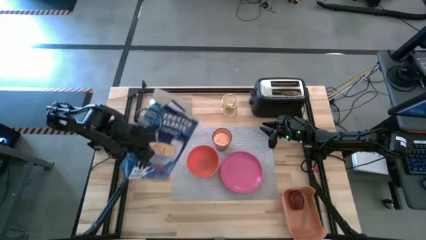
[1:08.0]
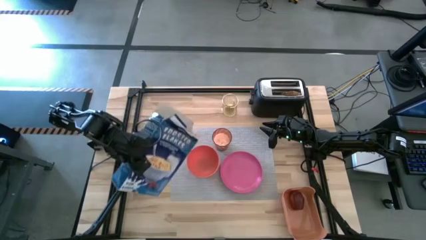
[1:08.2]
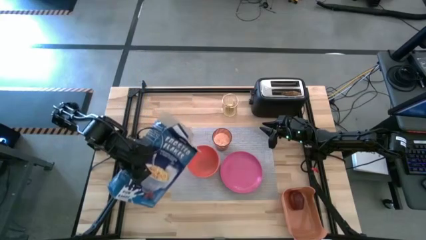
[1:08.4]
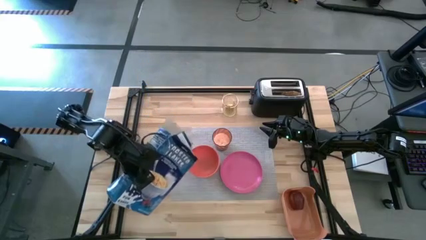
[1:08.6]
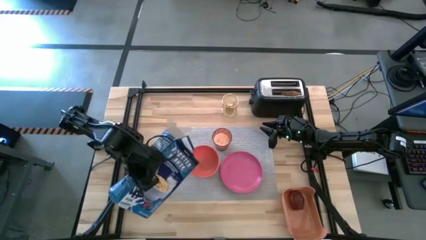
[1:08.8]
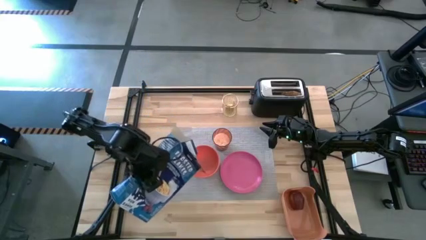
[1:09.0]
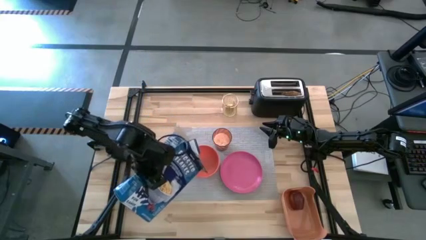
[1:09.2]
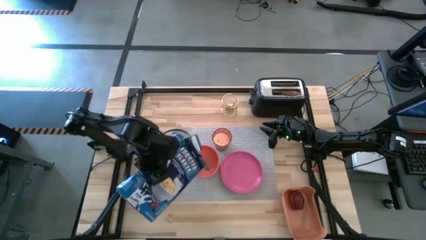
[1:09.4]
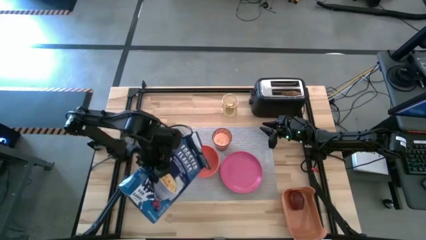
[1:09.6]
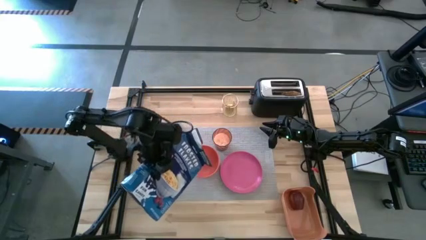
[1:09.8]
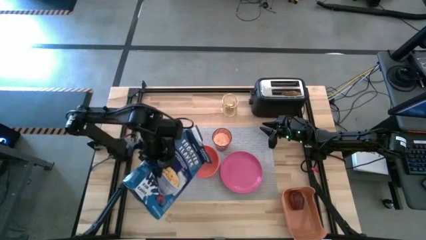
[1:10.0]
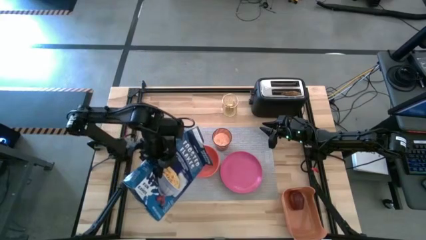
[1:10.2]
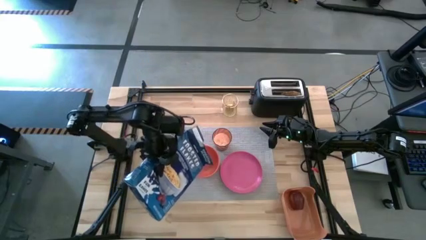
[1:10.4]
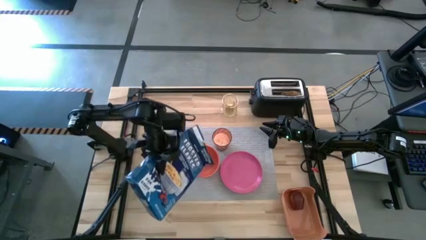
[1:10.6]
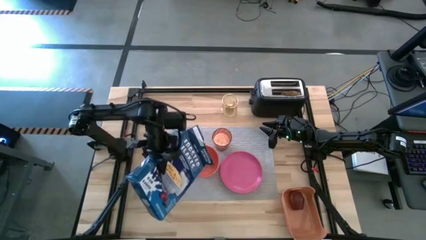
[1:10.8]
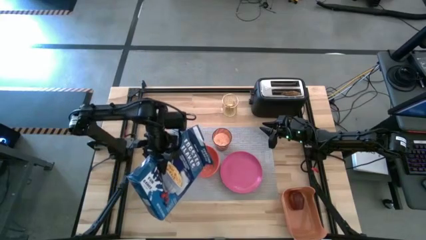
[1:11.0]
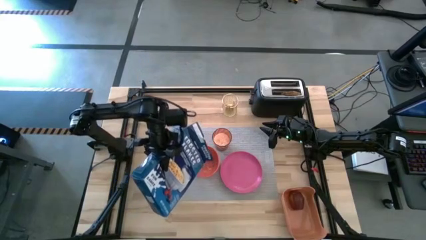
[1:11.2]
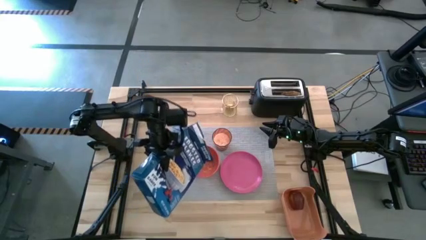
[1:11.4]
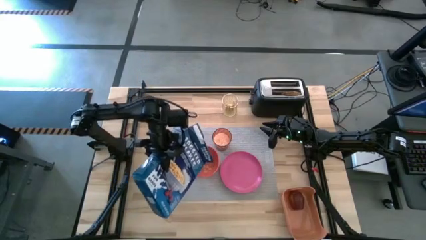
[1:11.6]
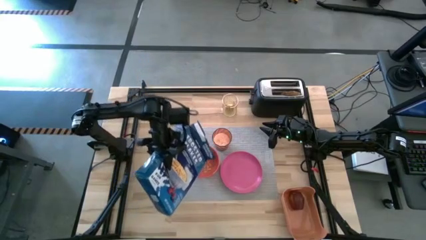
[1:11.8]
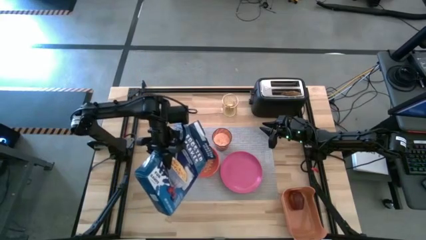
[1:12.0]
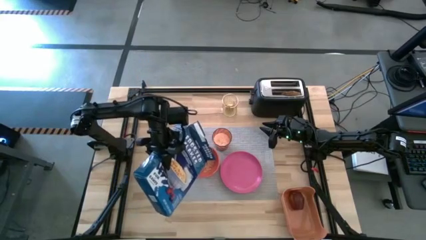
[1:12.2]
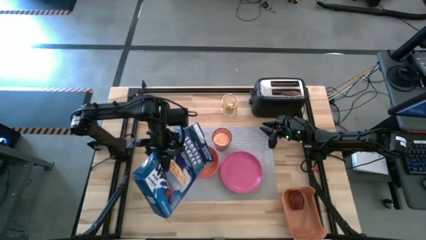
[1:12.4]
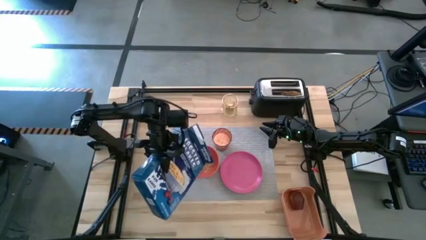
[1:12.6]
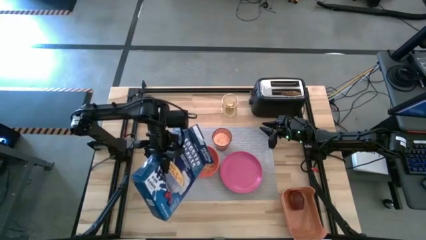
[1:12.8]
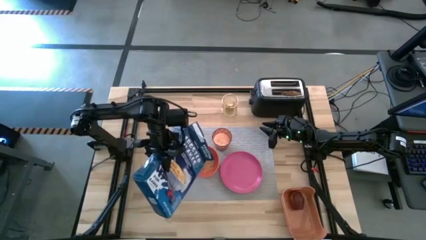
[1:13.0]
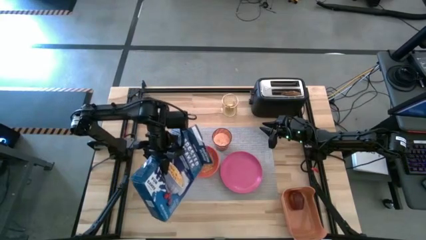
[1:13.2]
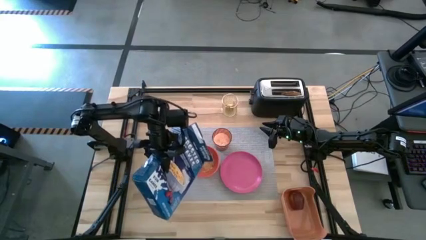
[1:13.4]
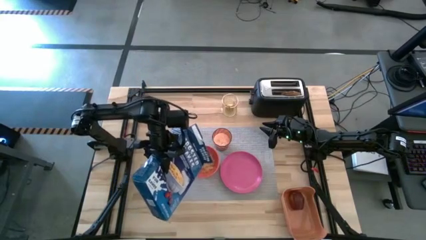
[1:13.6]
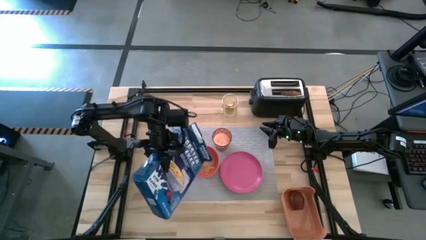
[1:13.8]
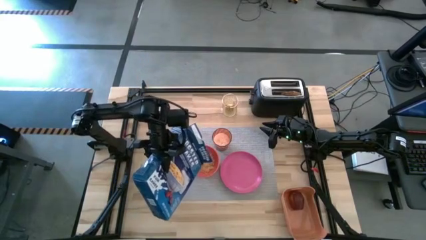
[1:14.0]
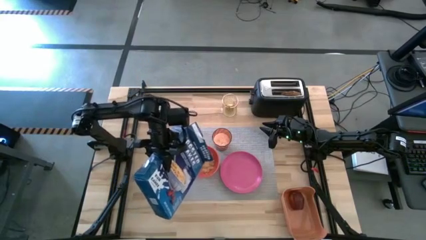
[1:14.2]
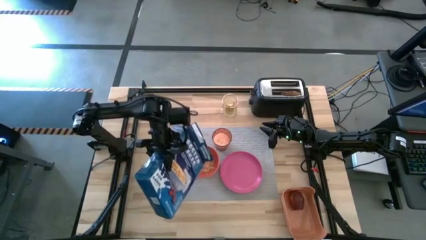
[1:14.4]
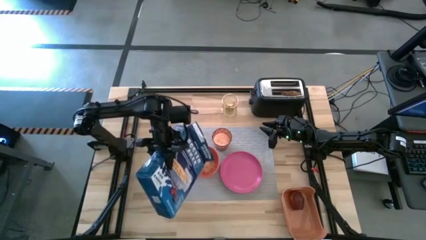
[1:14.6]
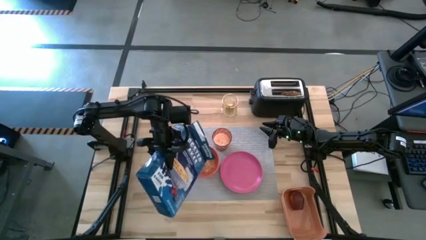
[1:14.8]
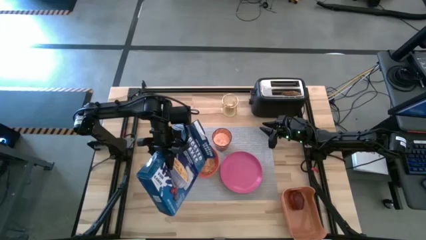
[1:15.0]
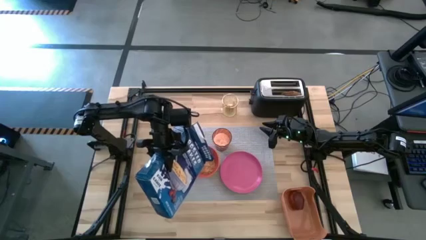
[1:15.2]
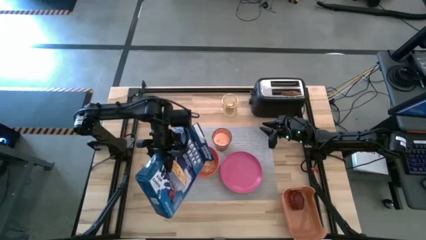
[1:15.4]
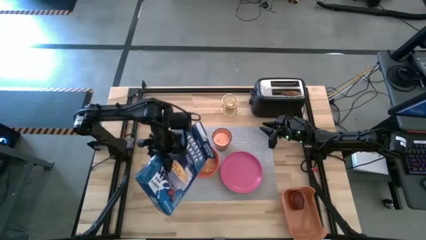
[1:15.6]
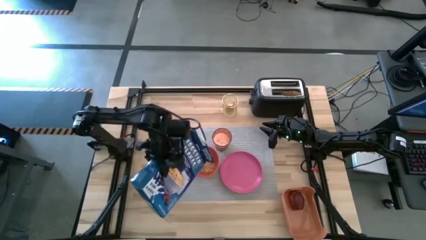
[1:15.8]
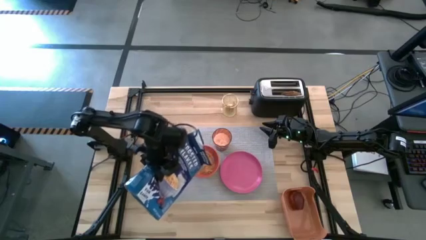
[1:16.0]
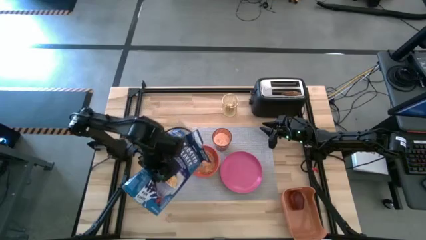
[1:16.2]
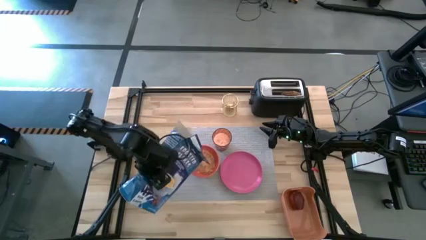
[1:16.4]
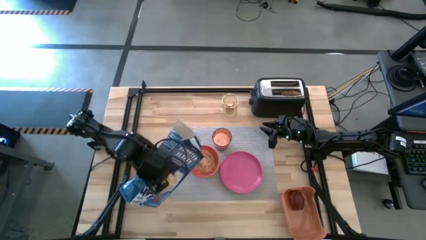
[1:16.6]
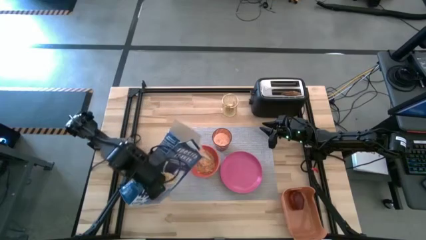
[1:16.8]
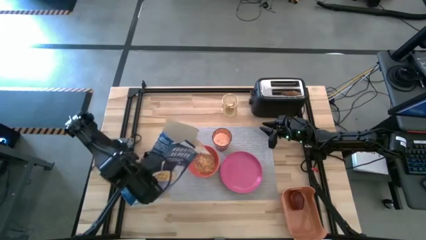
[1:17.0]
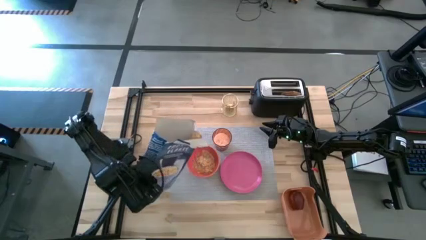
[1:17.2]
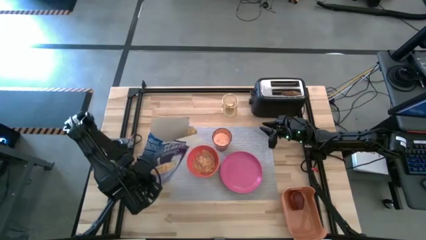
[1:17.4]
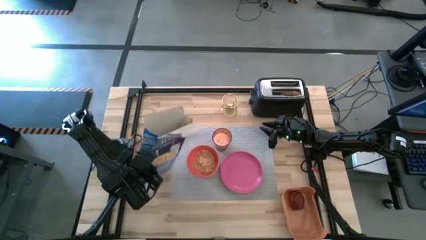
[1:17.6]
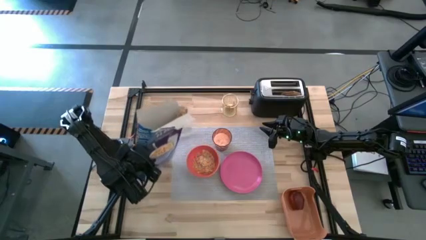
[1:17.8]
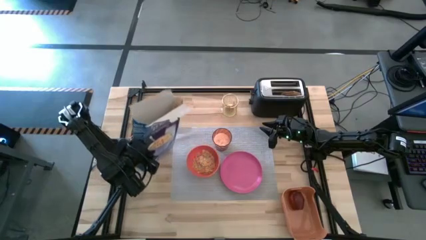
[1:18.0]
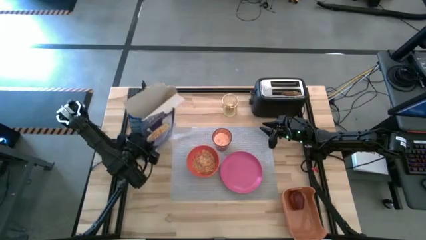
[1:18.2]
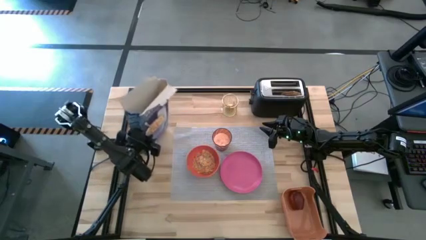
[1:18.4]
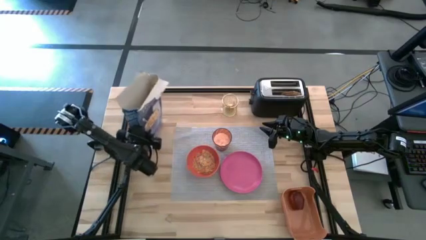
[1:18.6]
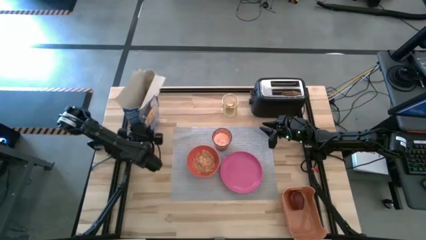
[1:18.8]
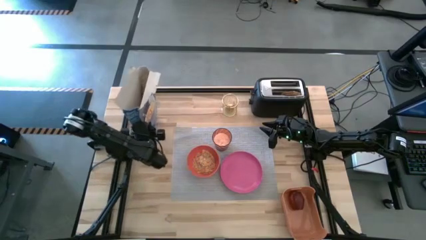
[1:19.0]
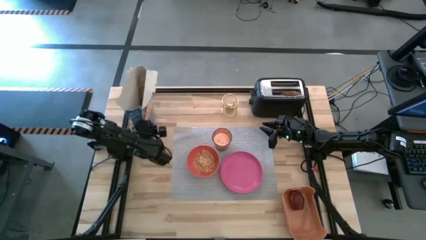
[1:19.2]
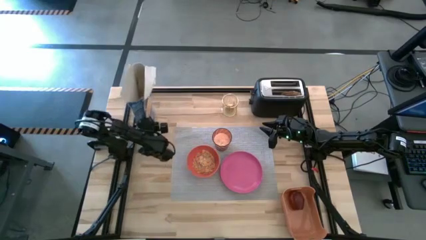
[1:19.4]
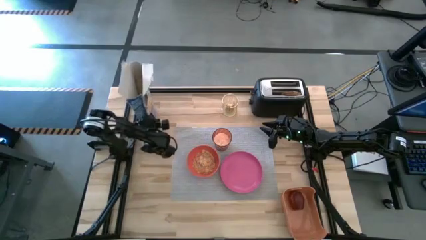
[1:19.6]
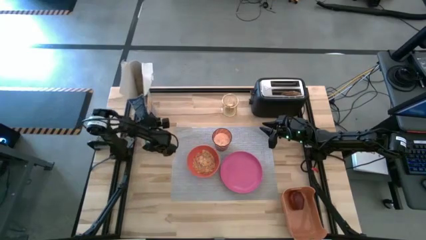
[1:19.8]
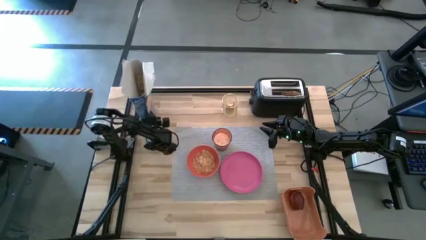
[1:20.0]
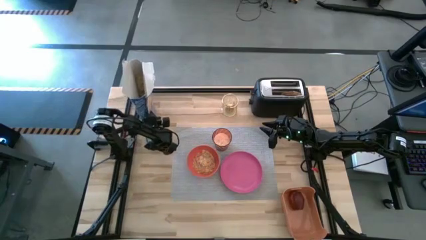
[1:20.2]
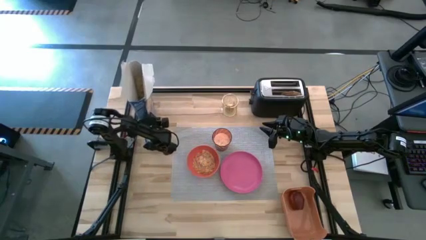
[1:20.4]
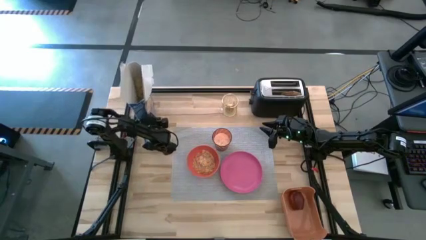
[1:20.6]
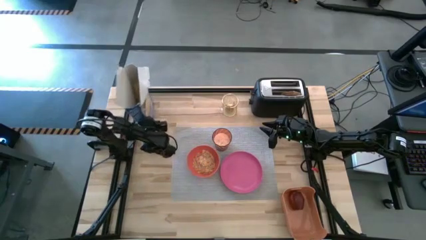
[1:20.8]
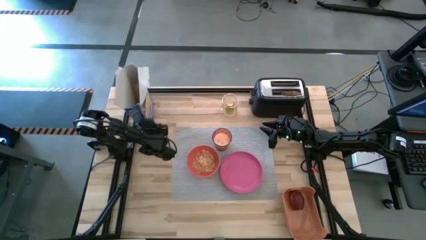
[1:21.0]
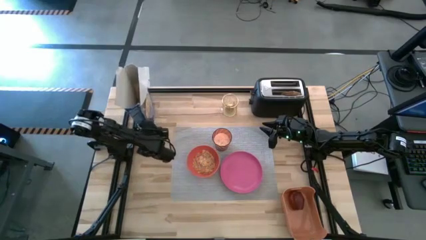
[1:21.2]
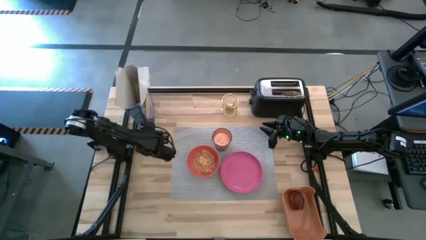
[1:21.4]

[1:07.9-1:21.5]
Task: Arrange a breakfast setting
Pour the cereal from the blue cereal box into the orange bowl
